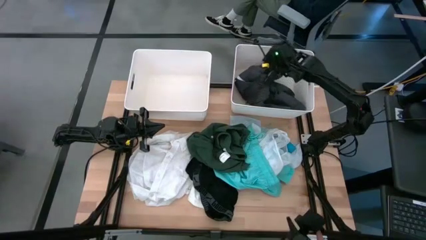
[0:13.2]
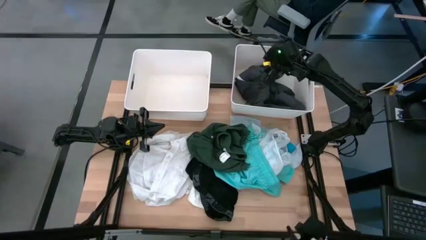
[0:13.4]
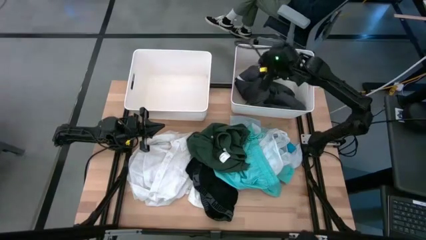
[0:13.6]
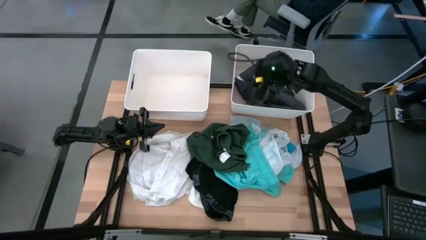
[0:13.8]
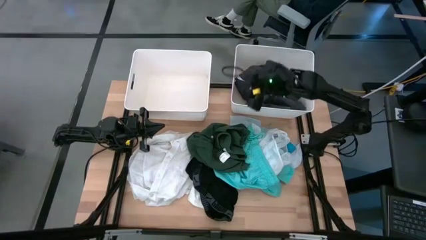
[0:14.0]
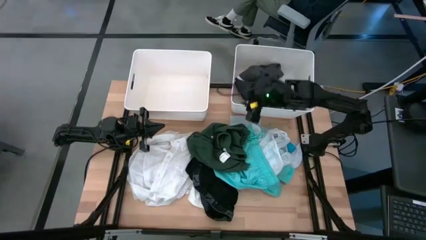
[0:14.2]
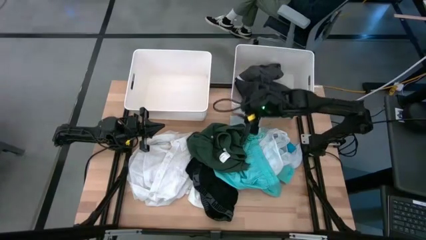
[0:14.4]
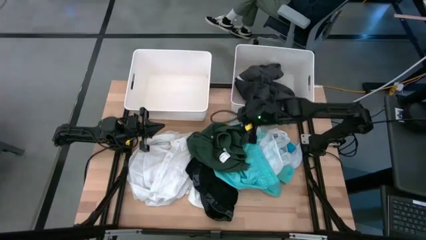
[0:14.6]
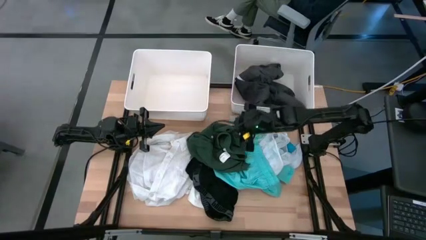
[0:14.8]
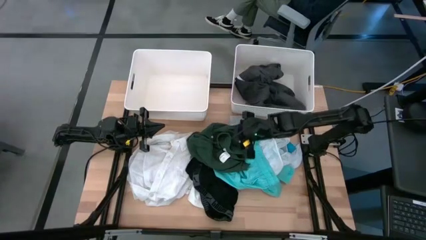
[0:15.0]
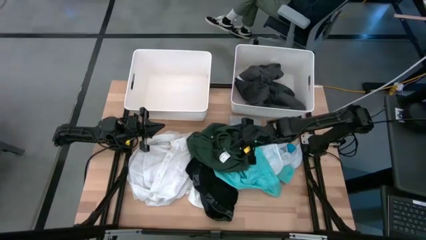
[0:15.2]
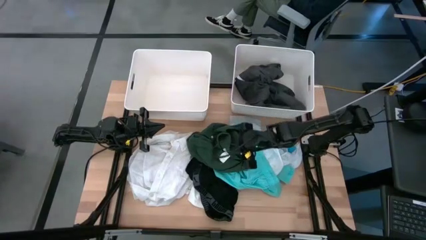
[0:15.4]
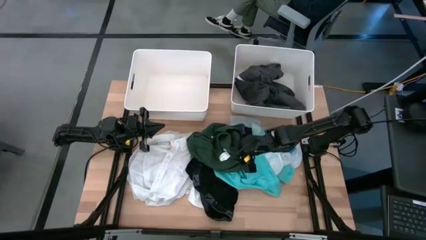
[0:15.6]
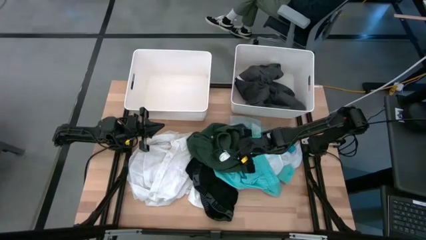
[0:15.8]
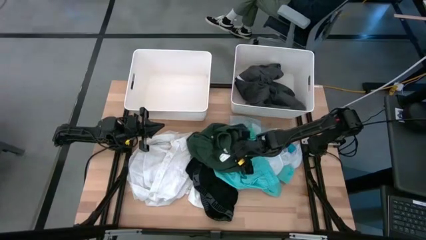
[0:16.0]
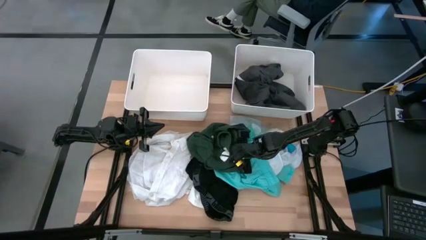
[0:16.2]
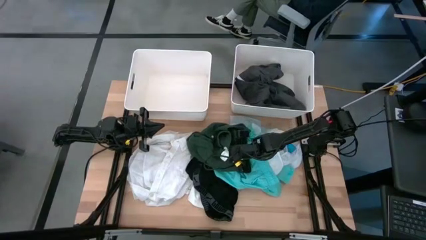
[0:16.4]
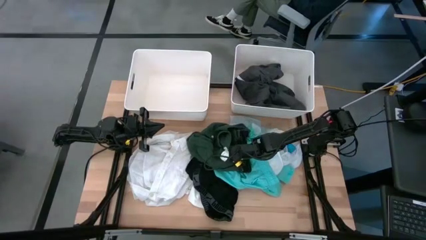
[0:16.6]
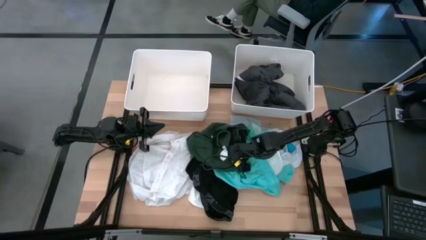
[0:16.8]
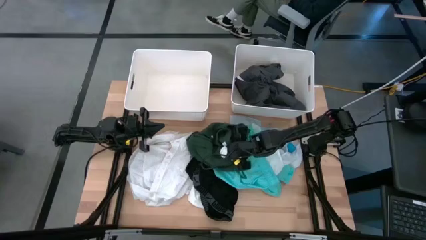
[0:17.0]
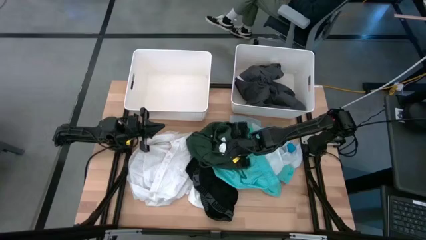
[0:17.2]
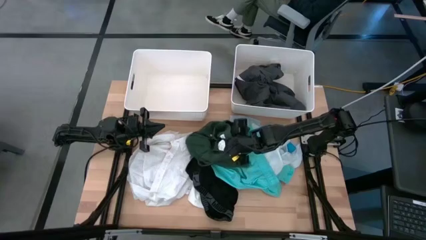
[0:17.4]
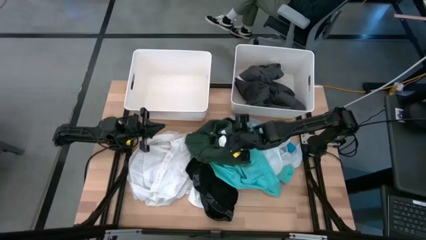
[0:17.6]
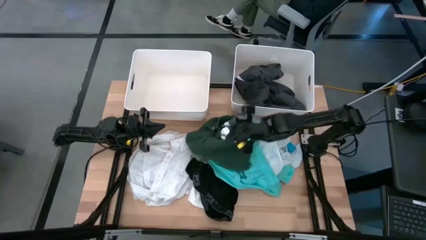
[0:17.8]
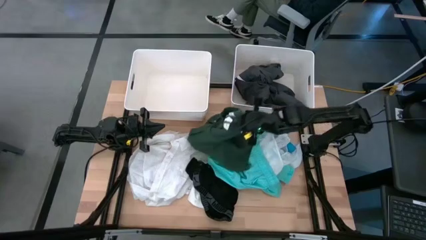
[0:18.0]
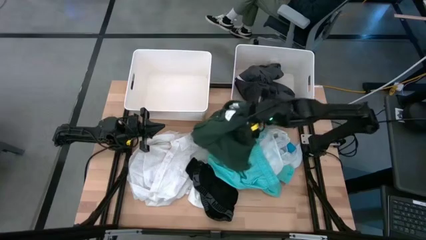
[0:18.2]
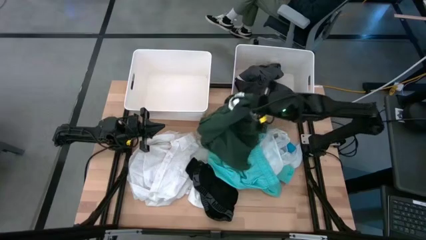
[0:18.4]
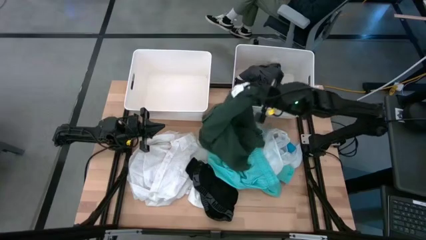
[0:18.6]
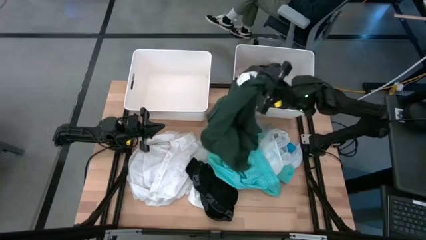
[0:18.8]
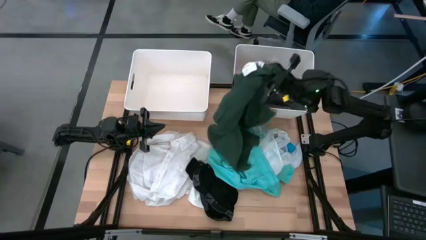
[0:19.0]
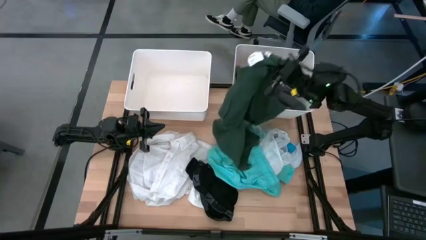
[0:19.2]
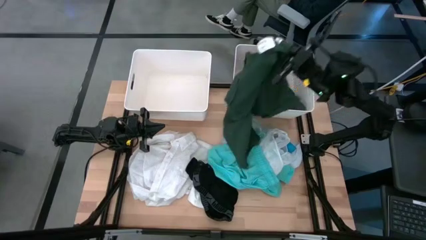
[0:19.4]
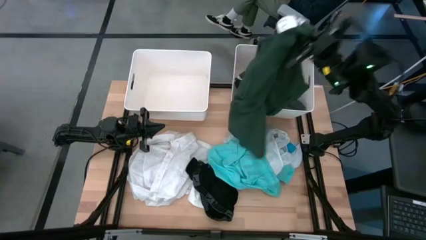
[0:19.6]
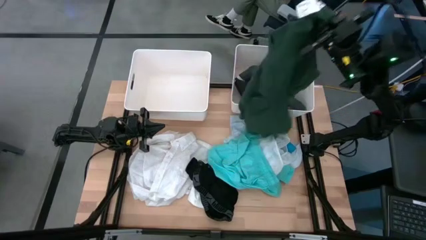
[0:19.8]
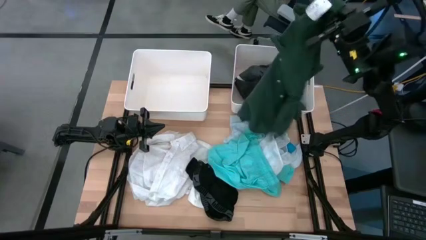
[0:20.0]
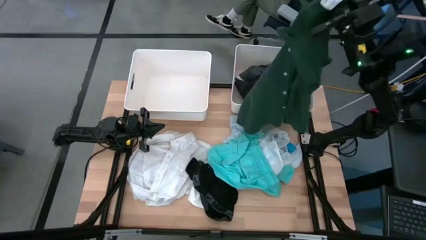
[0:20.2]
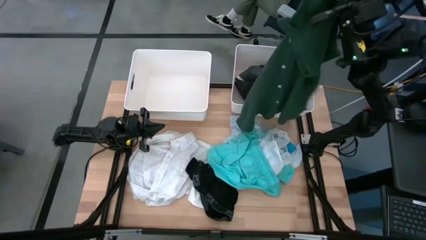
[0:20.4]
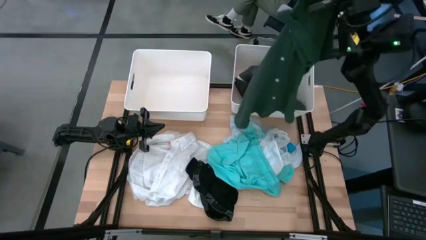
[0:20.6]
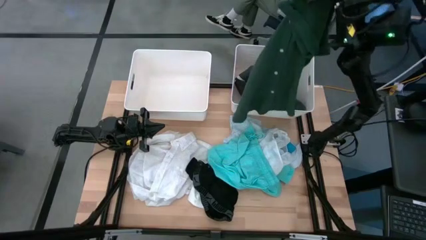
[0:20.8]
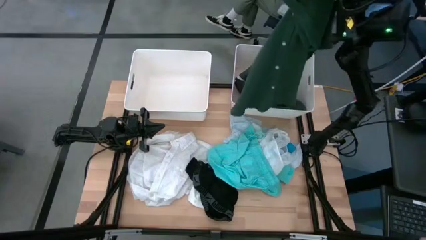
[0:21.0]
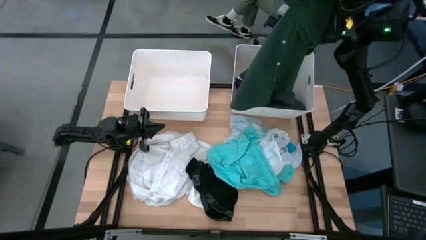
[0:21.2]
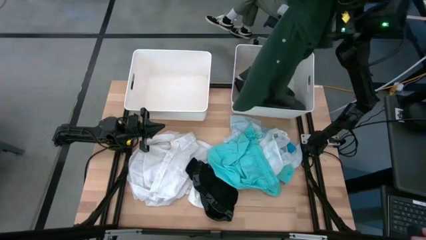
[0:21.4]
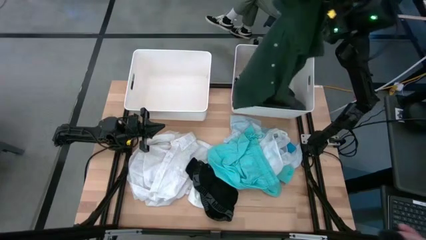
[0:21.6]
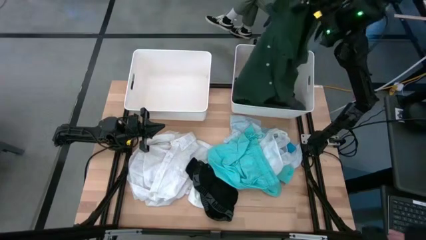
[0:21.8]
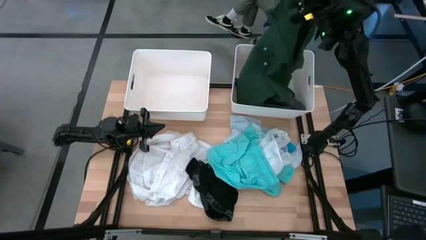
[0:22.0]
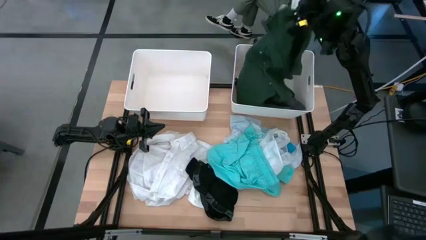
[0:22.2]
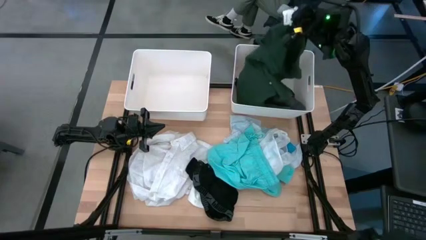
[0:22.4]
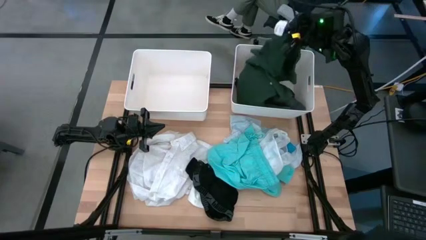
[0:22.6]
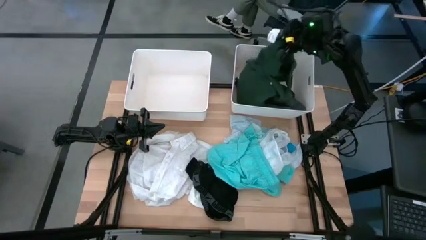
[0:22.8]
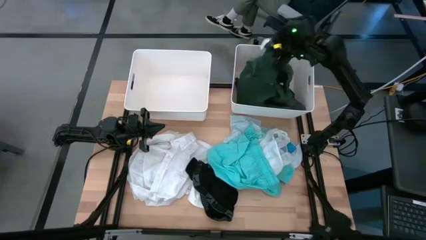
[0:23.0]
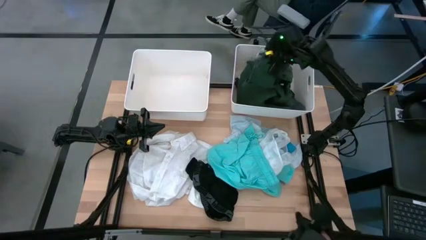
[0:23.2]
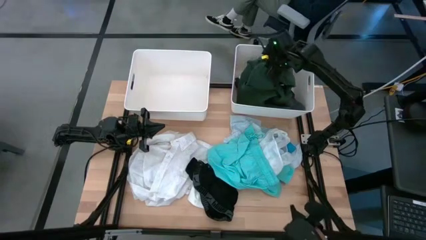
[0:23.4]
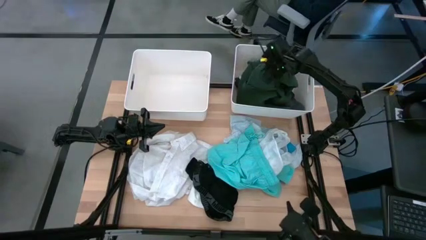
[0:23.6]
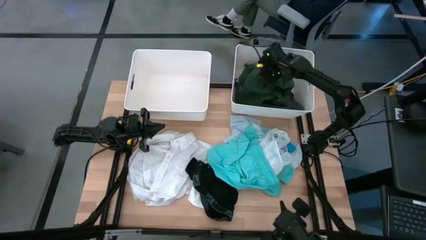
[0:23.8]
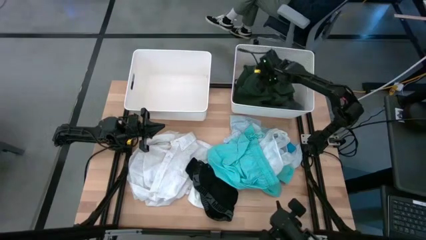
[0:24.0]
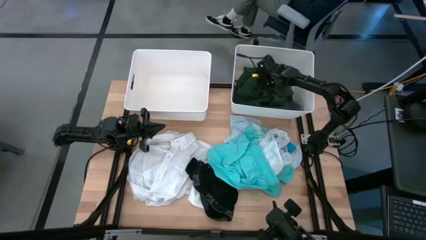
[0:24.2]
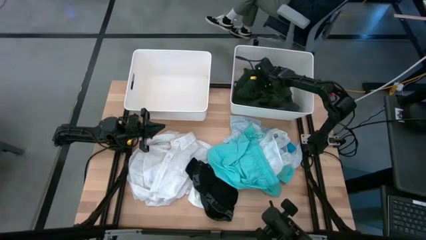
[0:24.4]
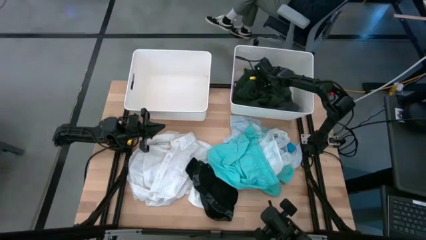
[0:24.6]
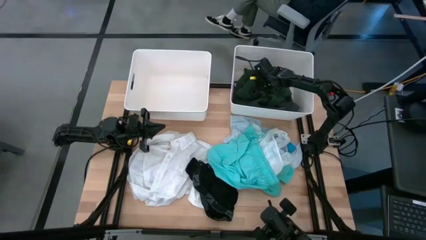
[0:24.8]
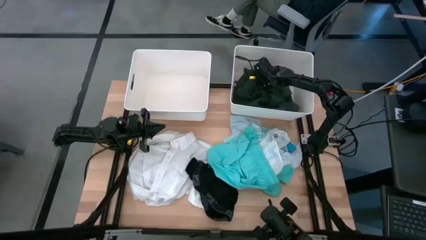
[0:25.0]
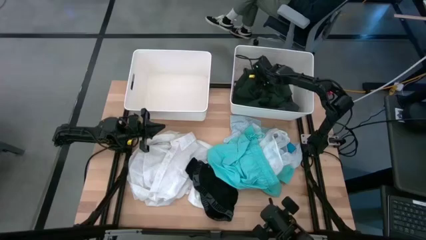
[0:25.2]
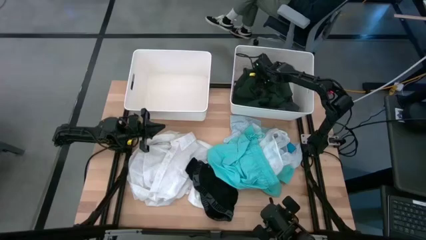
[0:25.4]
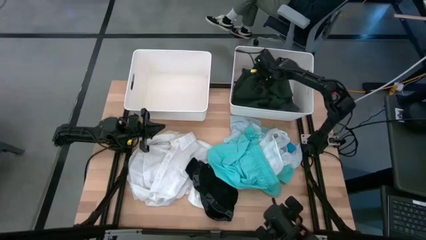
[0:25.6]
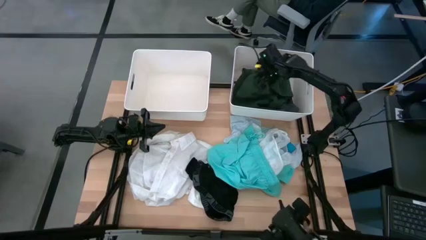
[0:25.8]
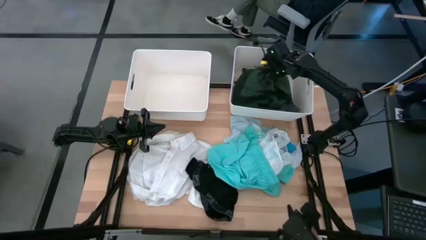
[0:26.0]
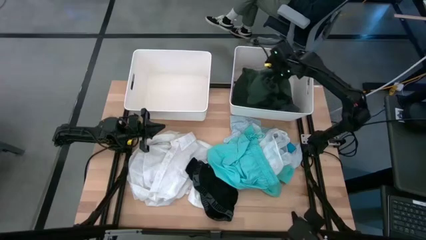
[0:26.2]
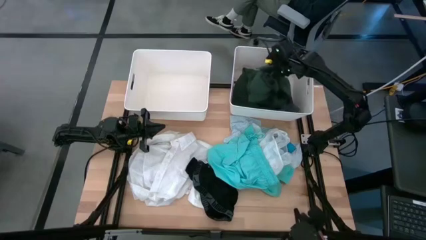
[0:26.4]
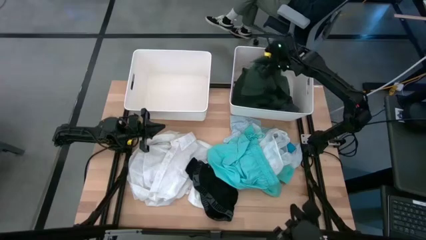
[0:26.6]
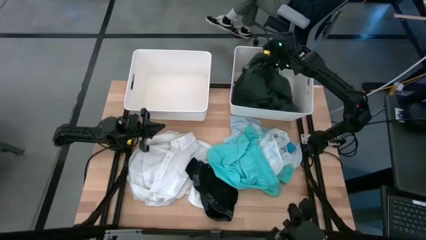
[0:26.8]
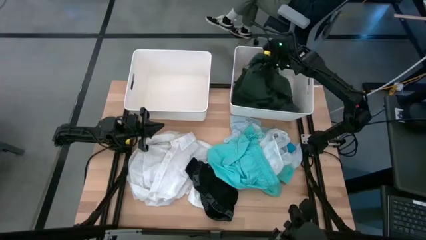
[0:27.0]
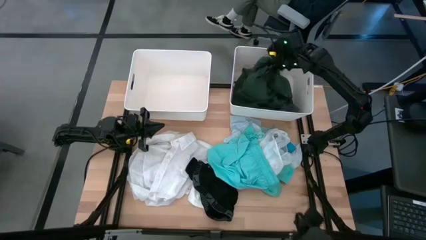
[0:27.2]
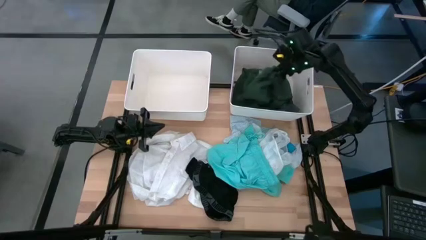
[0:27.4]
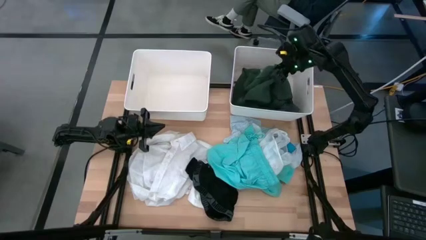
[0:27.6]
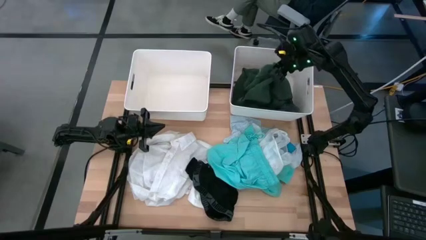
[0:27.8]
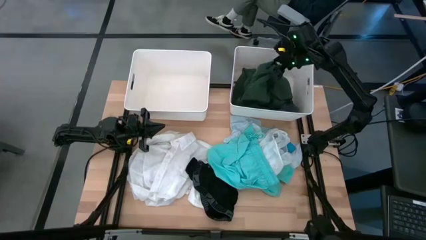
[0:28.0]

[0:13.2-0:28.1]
Task: Sort clothes
Put the green polo shirt into the right white bin
